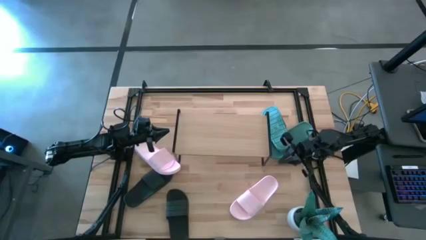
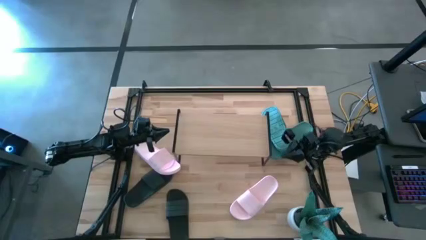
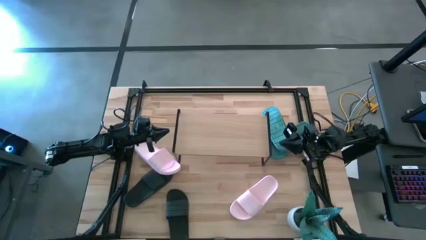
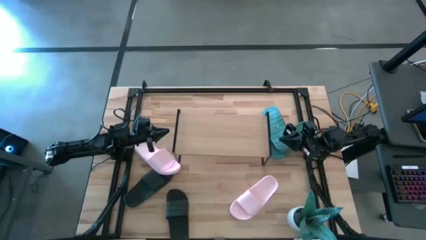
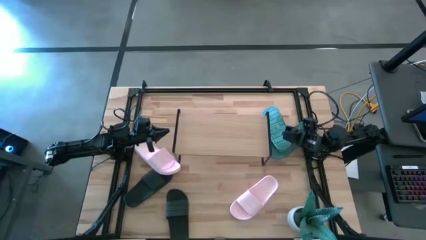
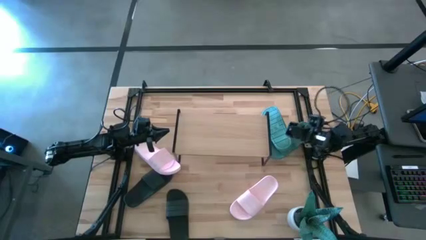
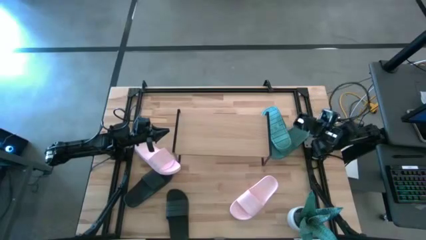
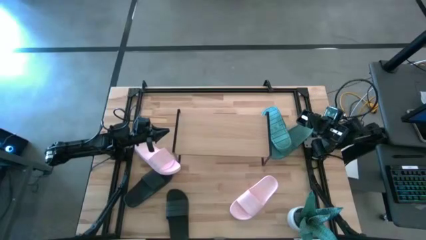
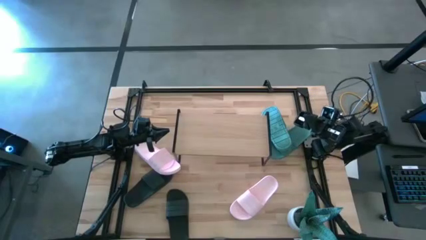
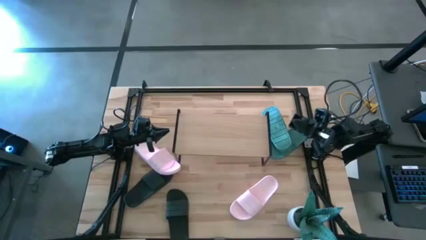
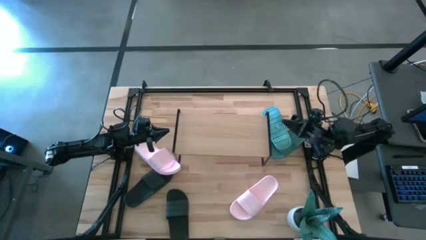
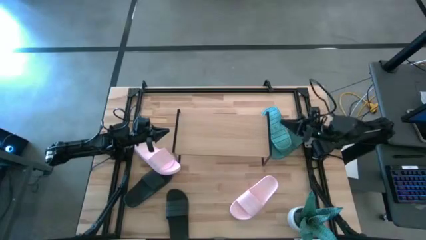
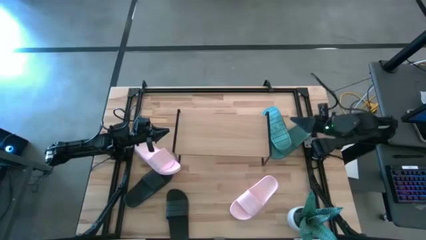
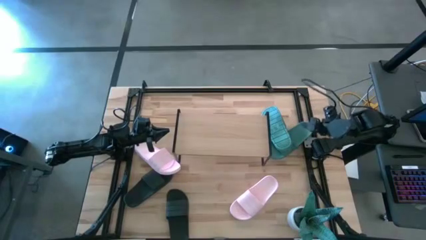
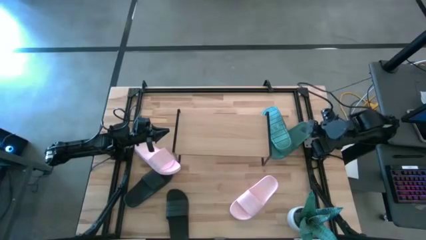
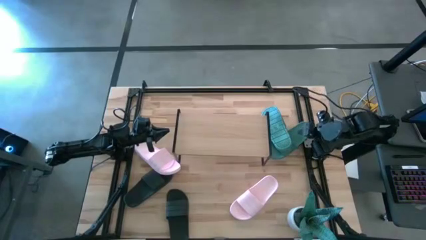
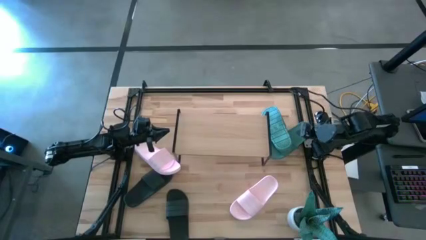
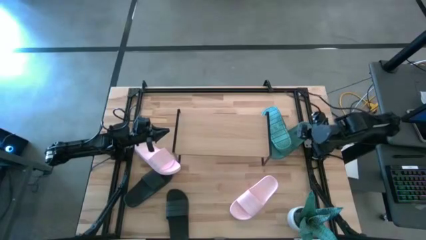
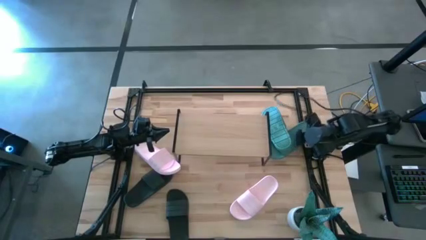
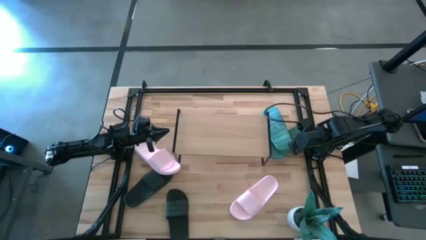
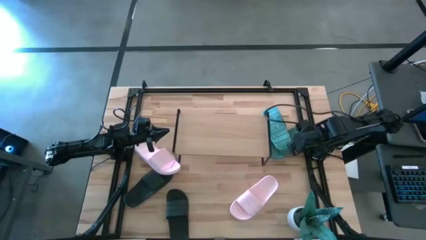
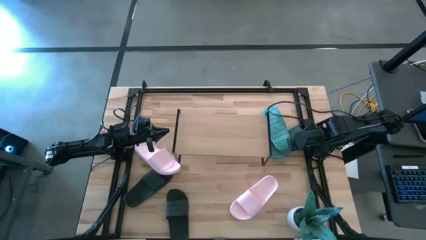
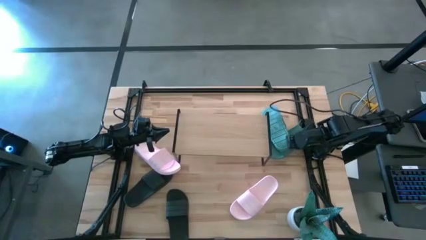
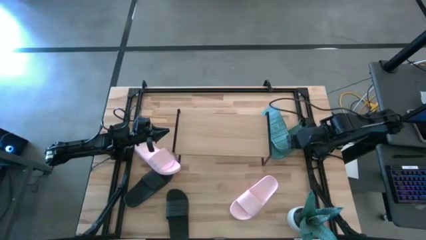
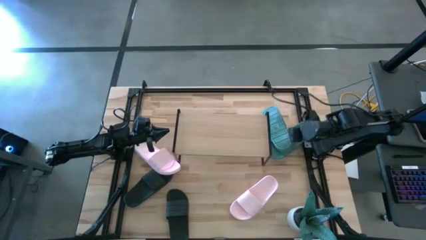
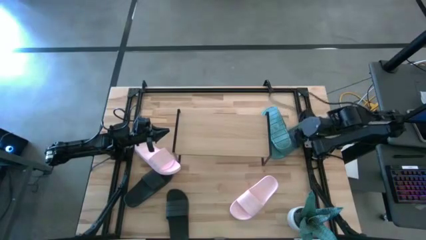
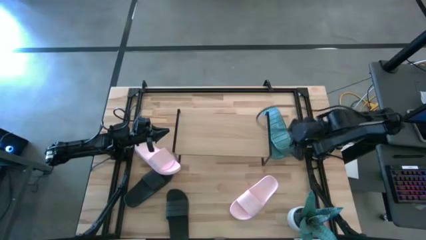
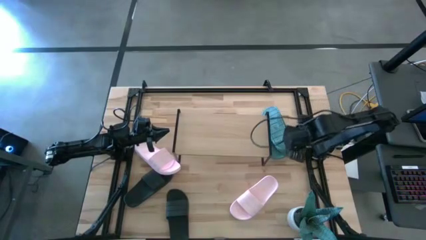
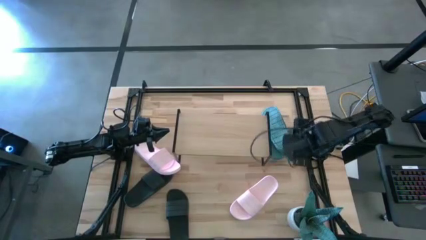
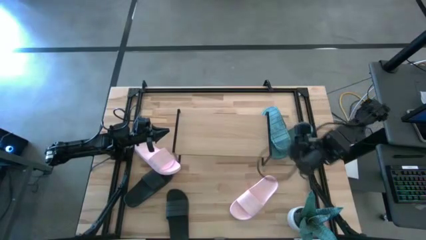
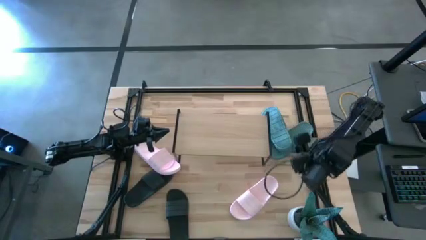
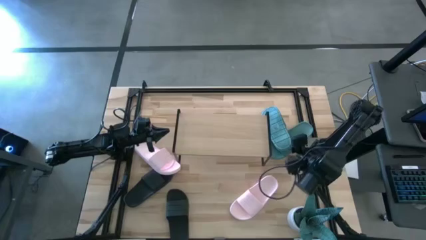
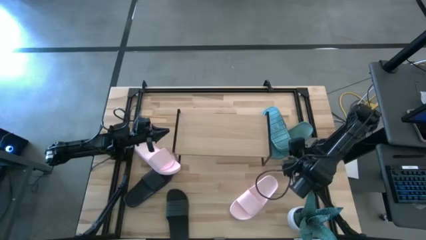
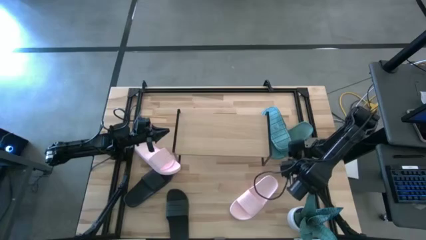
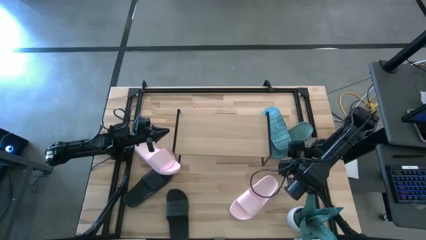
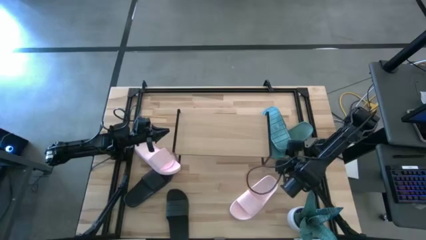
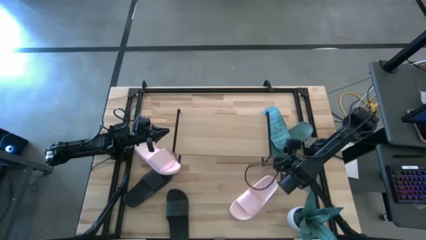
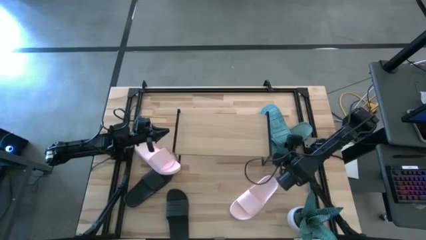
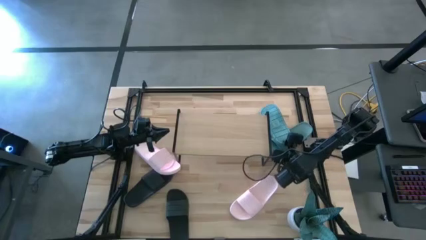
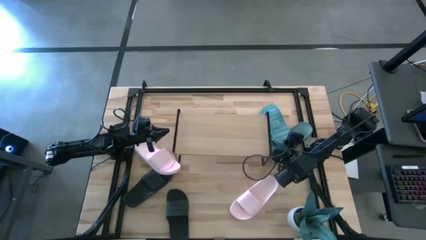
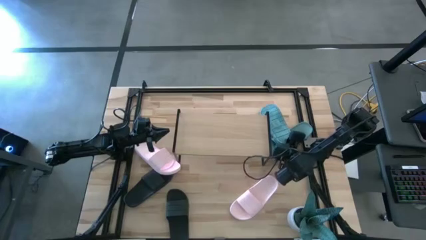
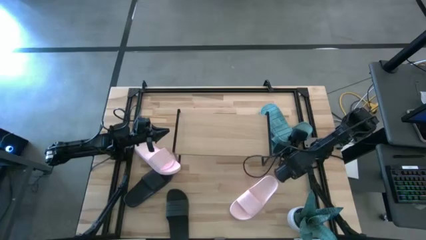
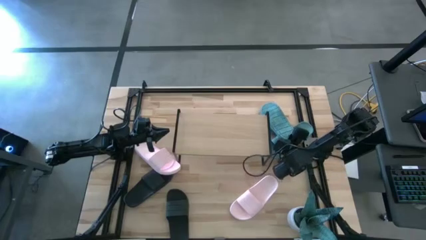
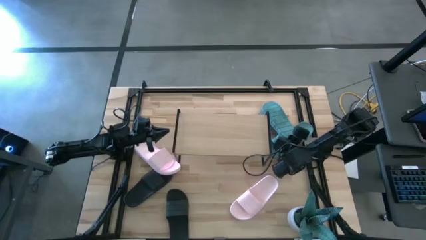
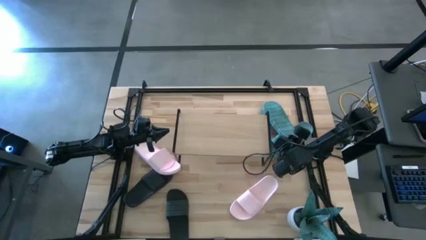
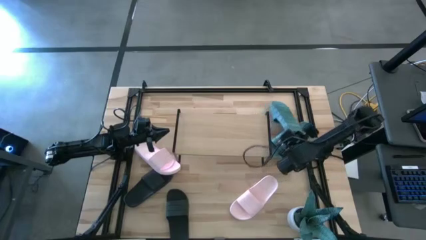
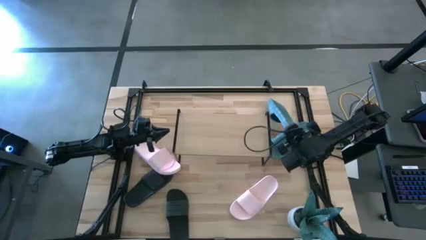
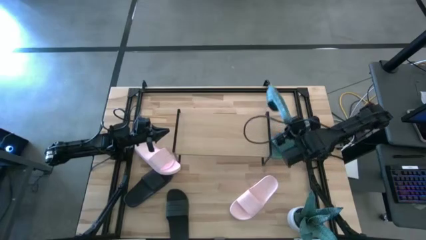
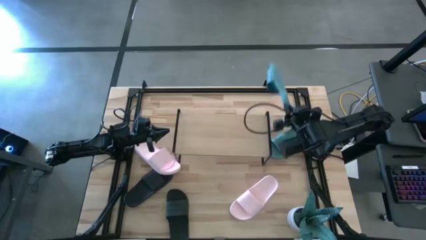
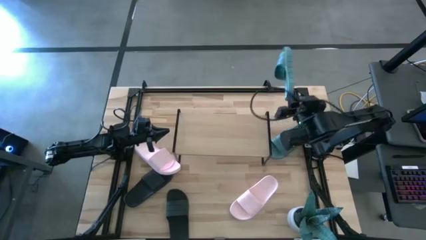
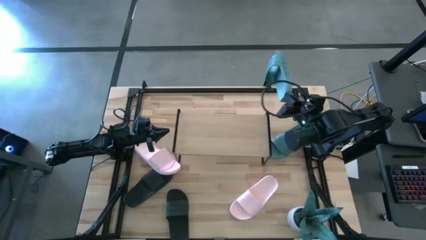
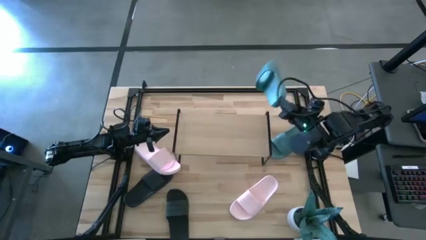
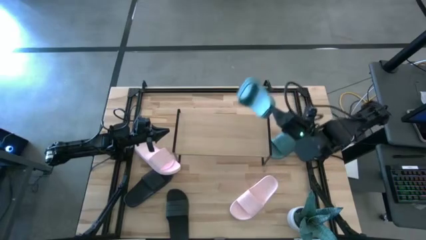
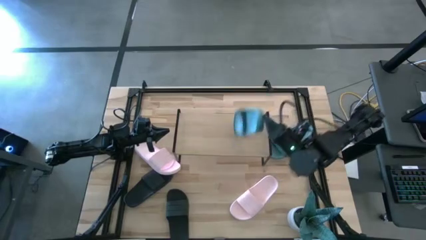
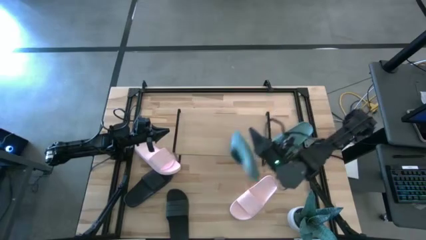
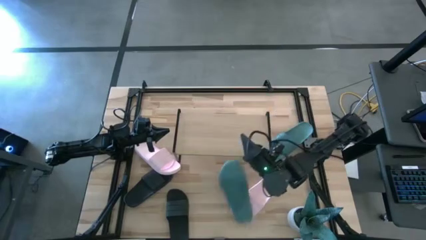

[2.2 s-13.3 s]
Task: Pick and place slides into the shelf
Put the green slipper on the shelf

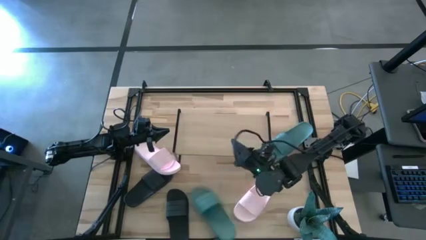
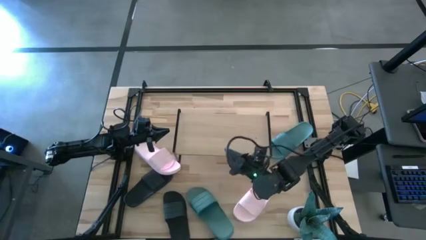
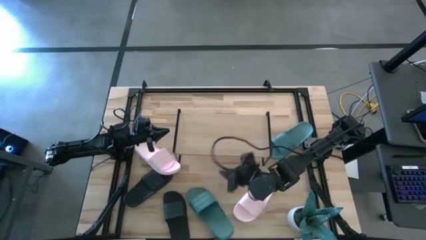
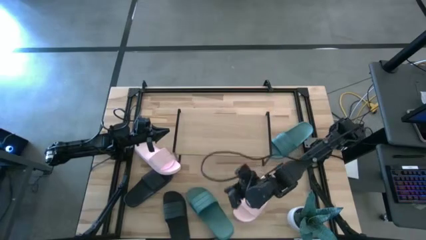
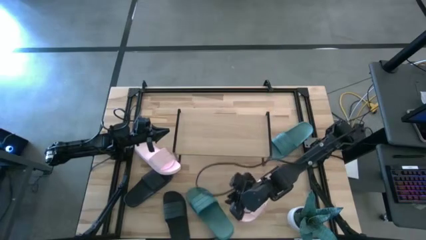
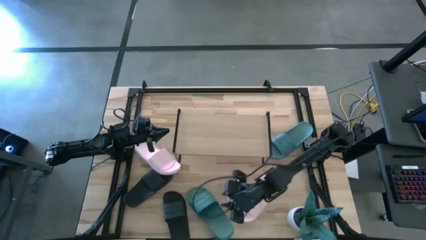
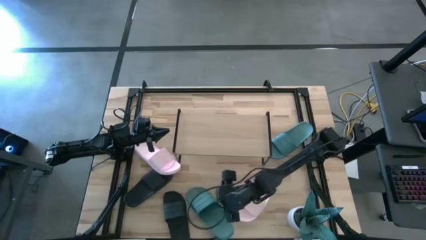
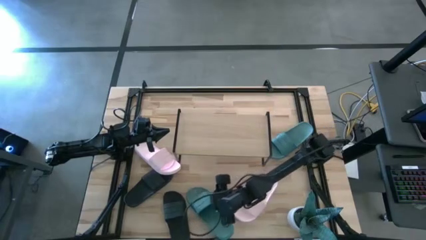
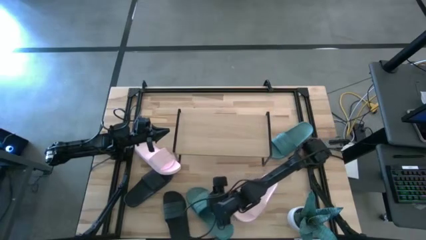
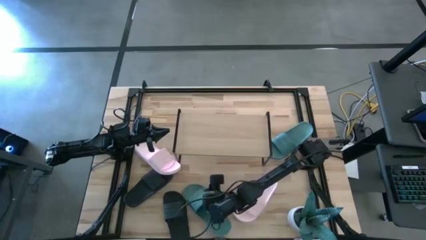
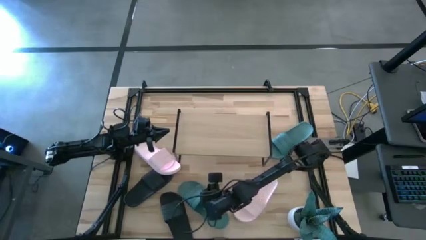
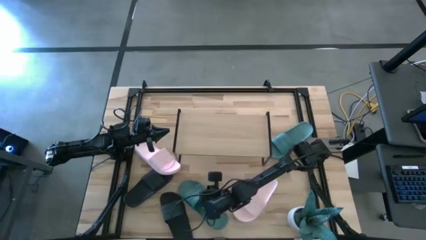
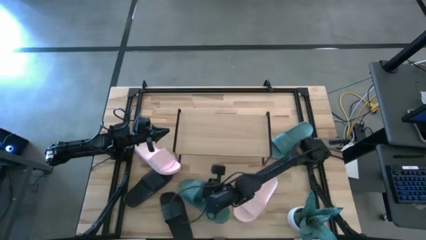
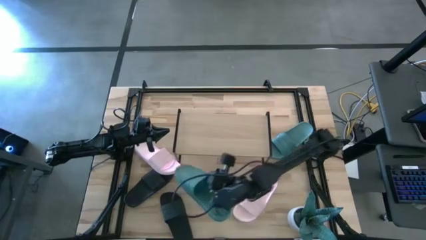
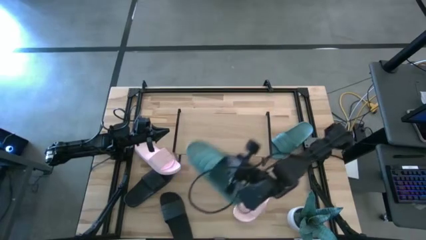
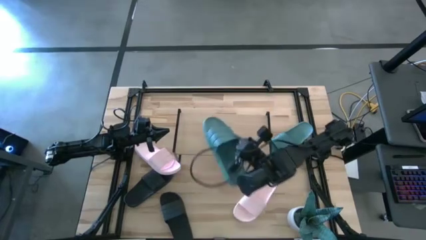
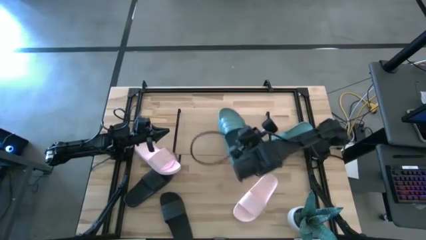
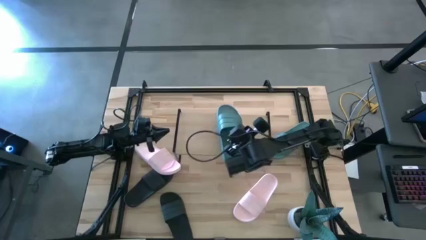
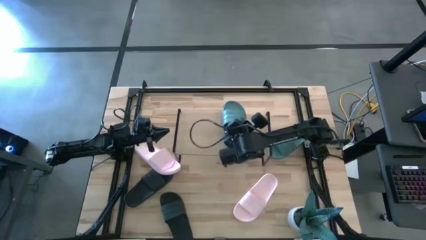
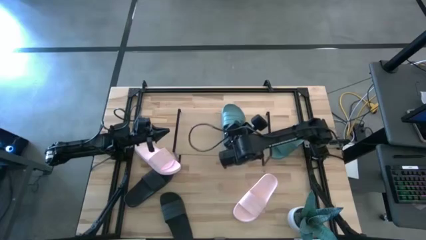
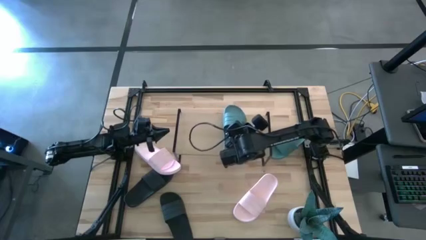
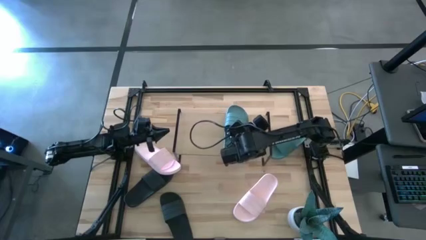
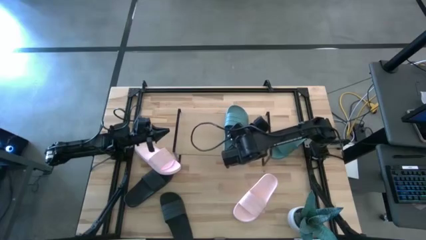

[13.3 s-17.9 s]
Put the bottom green slipper on the shelf
